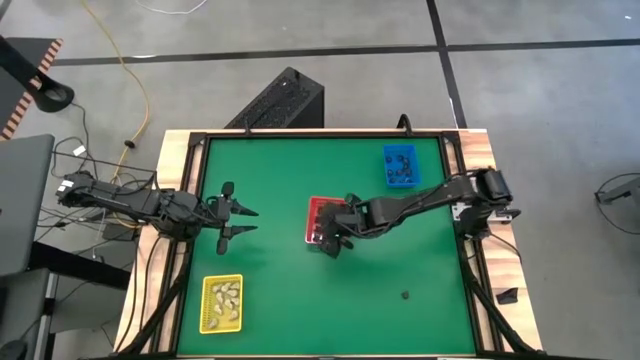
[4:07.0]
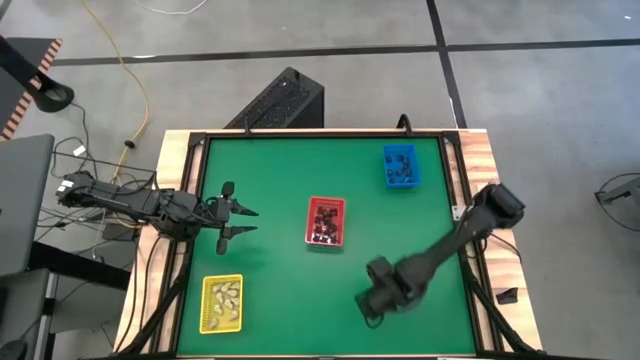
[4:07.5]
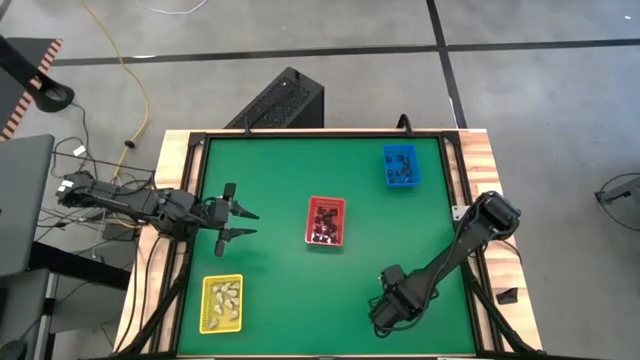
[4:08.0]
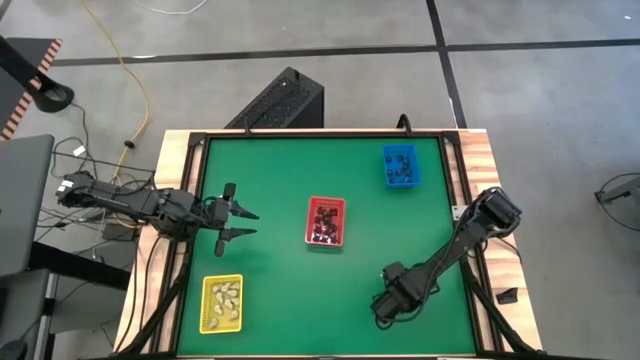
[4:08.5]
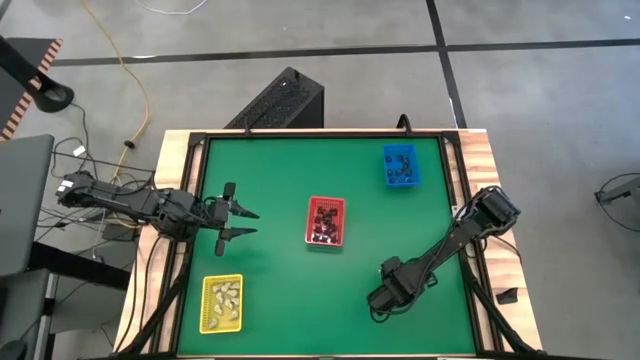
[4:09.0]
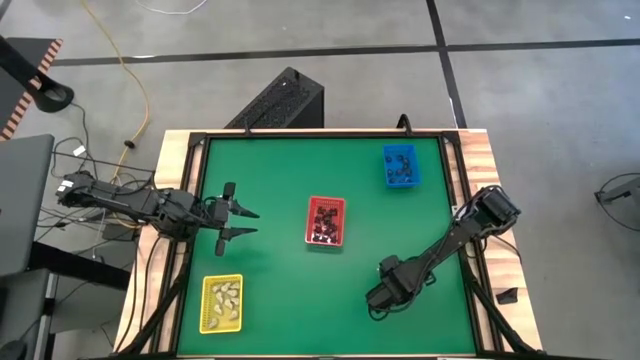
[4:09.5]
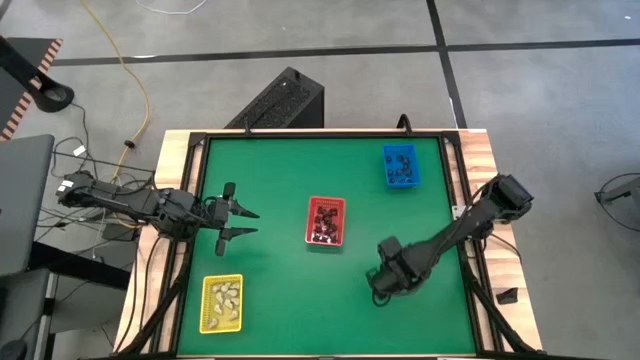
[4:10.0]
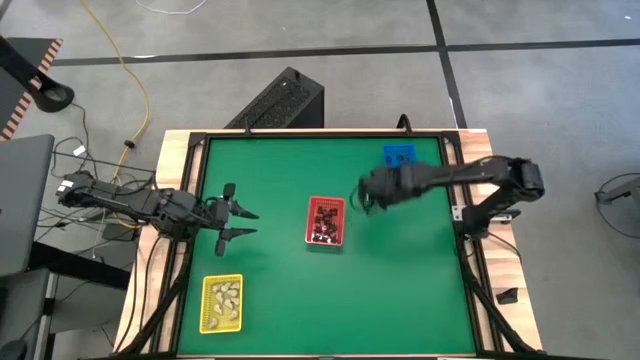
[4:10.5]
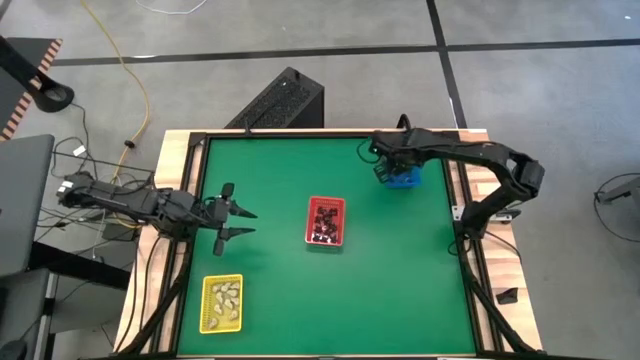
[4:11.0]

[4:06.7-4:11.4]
Task: Sort Halloween decoration
Put the black skull toy into the blue bin

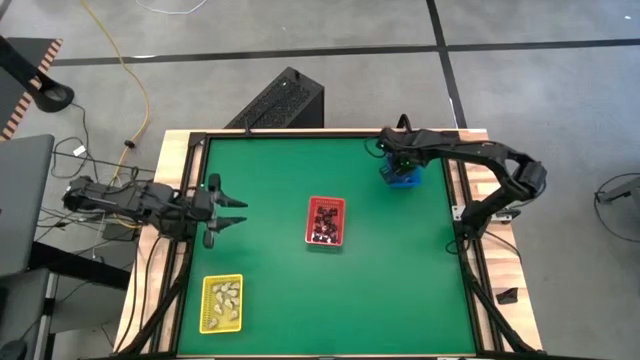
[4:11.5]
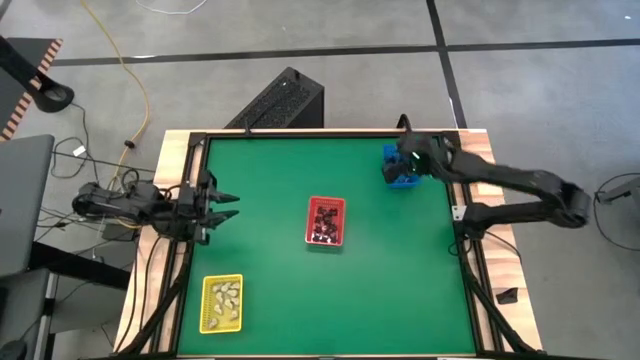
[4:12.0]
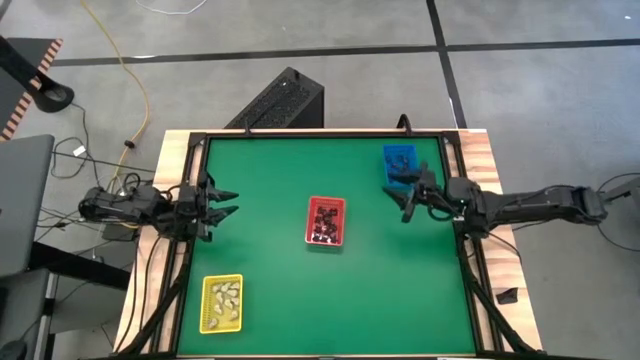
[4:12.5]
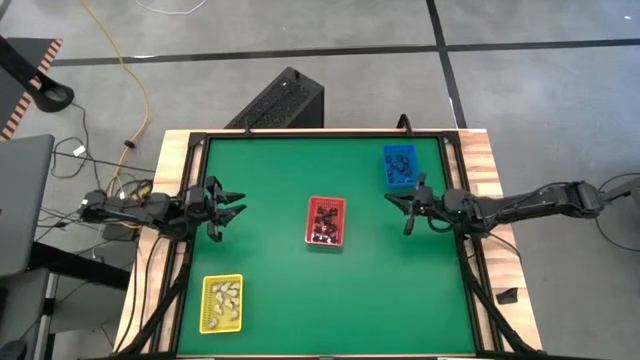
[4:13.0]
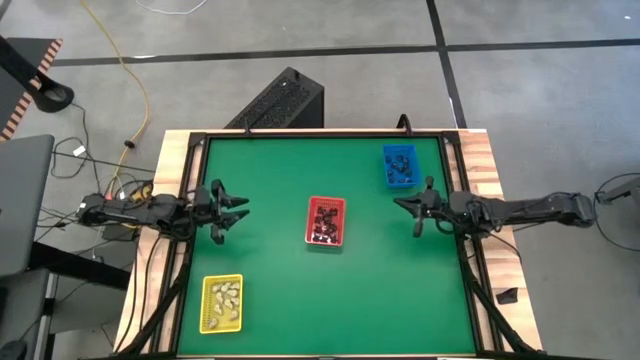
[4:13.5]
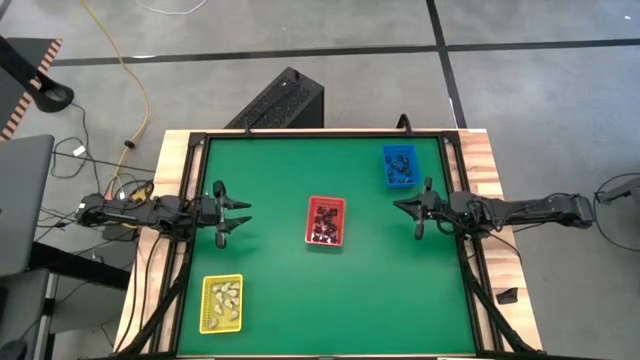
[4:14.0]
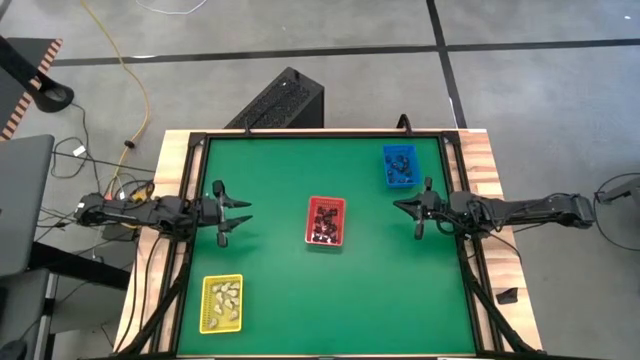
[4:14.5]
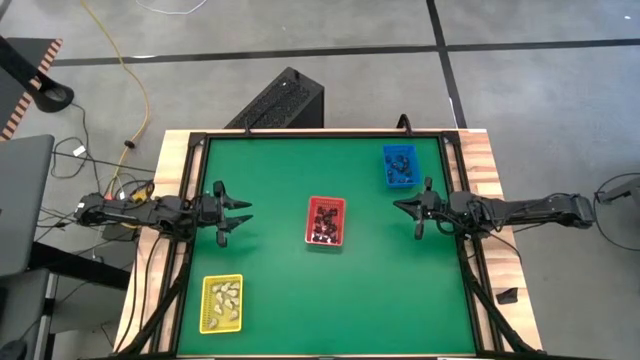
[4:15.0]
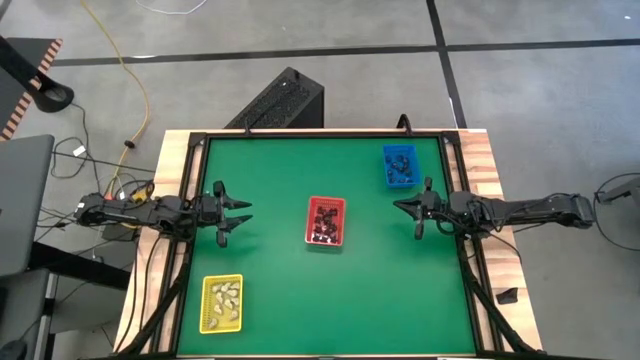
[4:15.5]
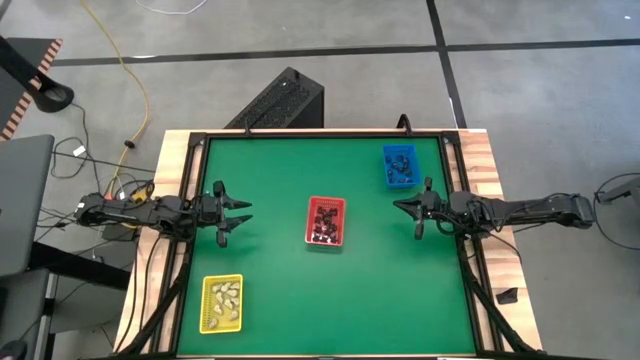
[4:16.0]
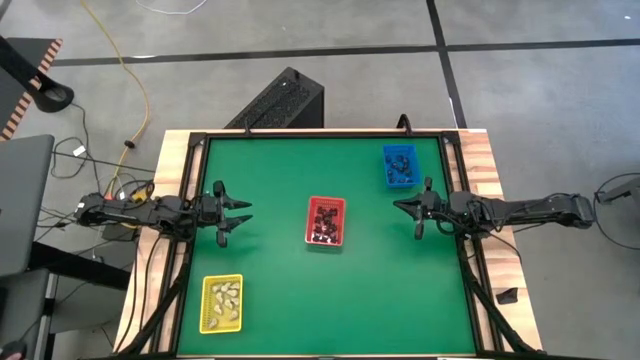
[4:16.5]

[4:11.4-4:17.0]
Return to Home Position

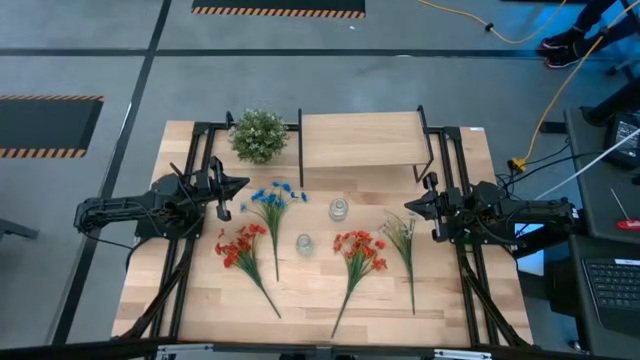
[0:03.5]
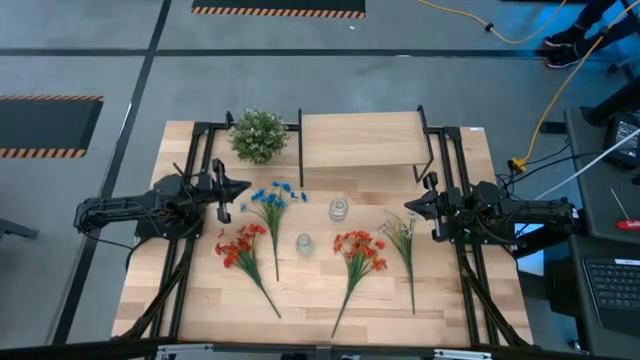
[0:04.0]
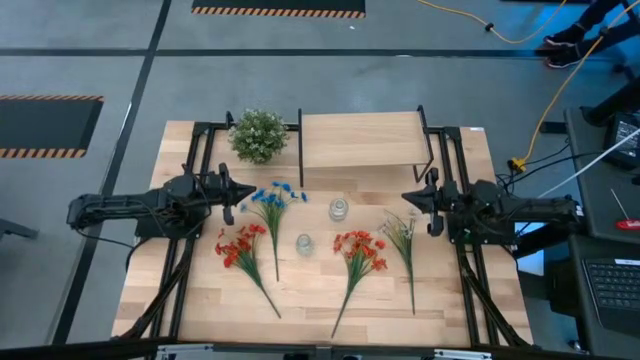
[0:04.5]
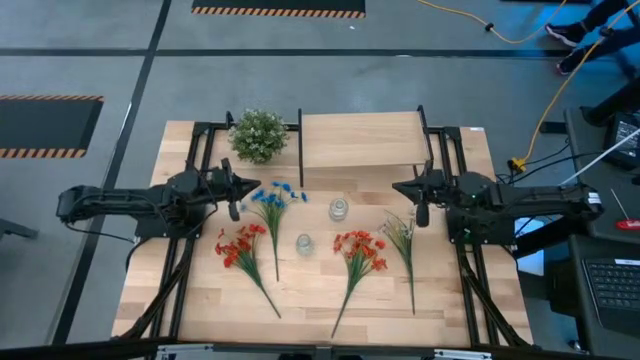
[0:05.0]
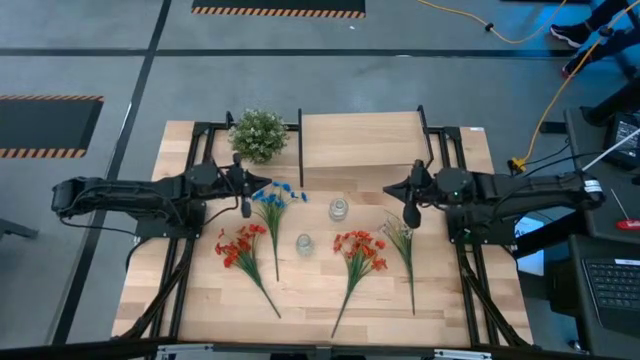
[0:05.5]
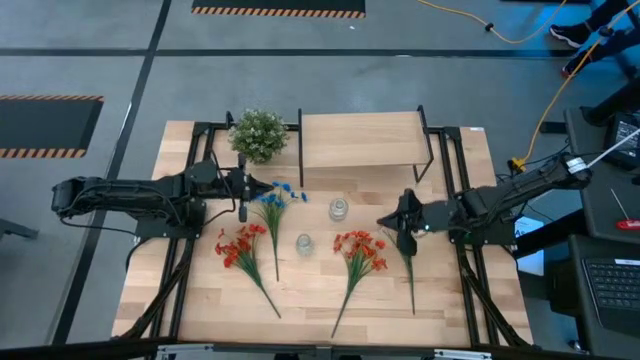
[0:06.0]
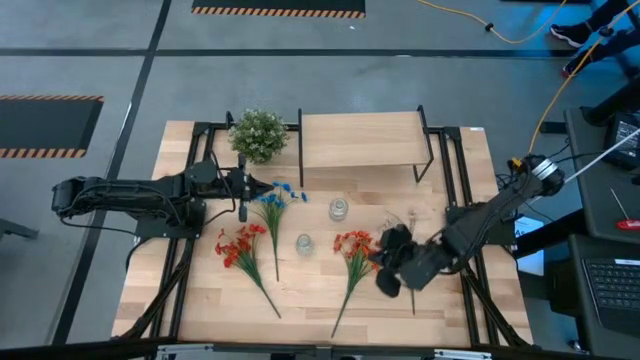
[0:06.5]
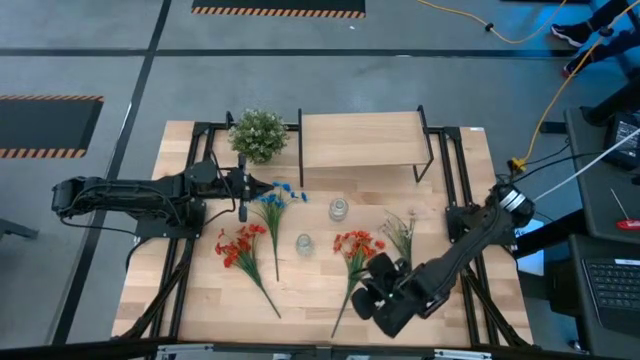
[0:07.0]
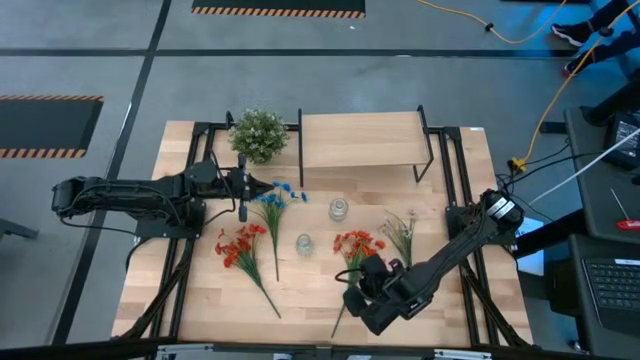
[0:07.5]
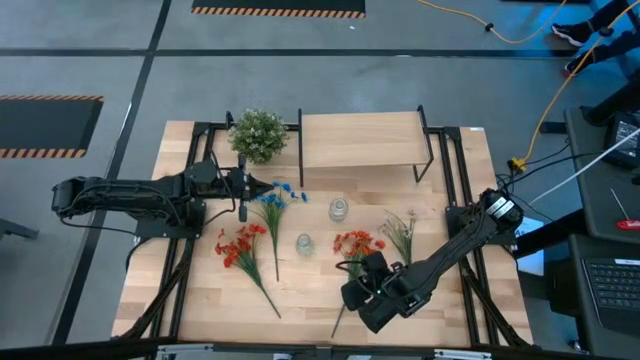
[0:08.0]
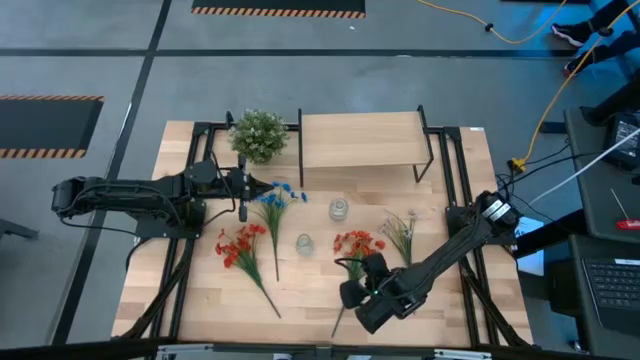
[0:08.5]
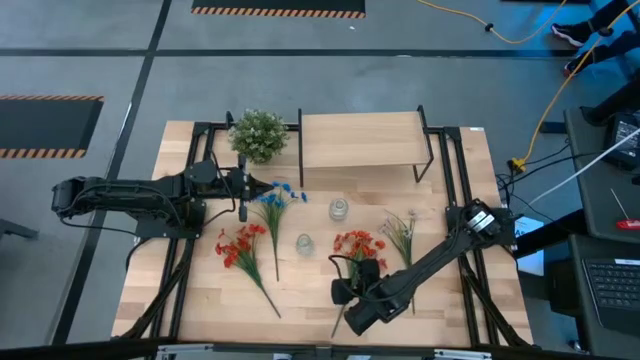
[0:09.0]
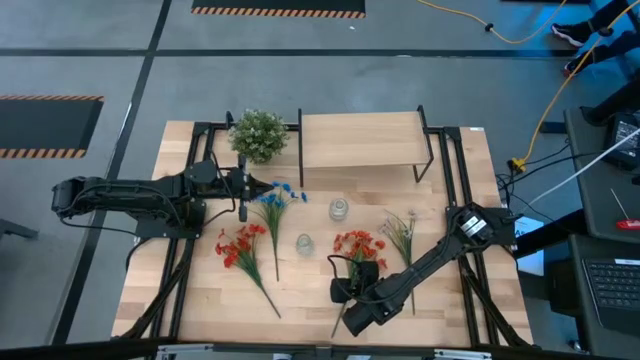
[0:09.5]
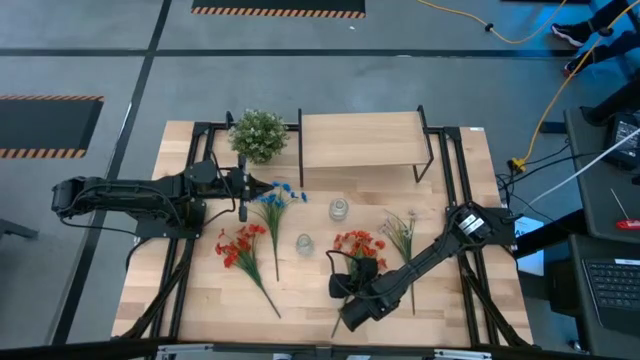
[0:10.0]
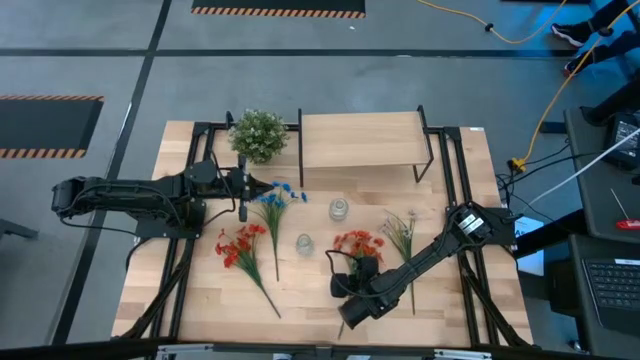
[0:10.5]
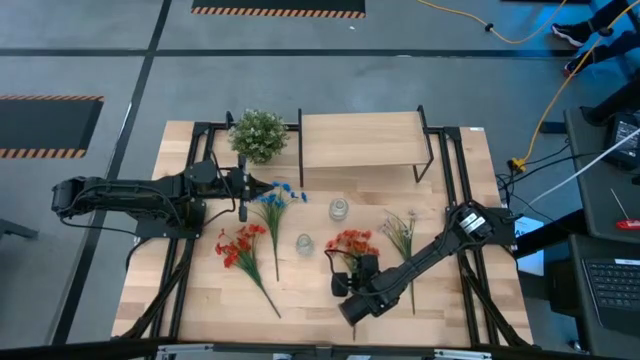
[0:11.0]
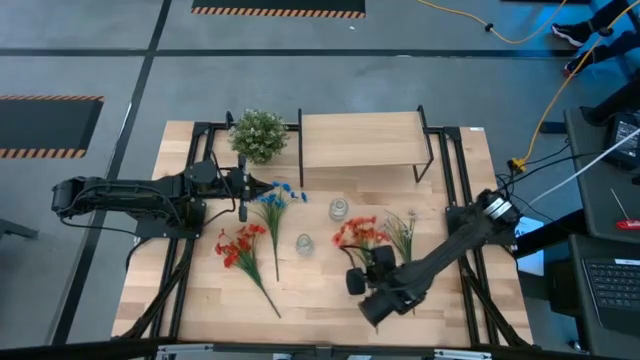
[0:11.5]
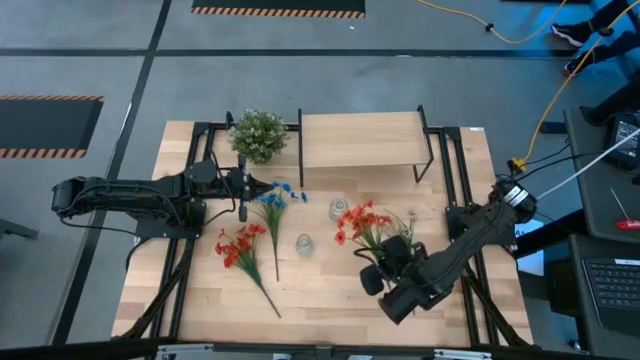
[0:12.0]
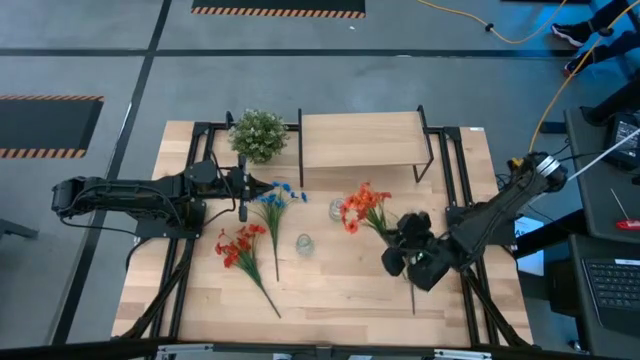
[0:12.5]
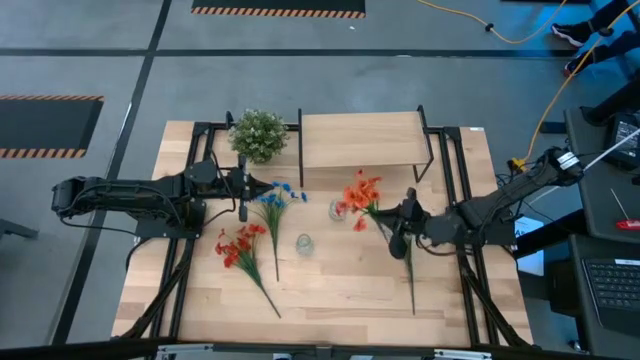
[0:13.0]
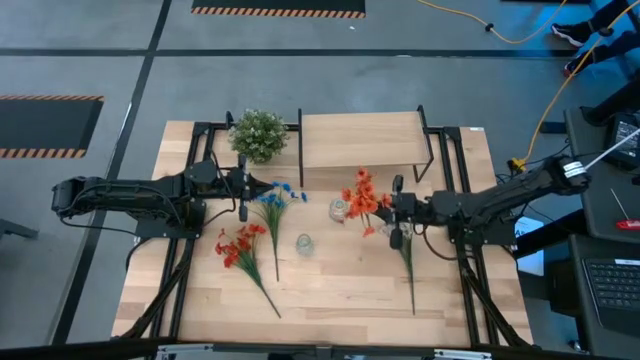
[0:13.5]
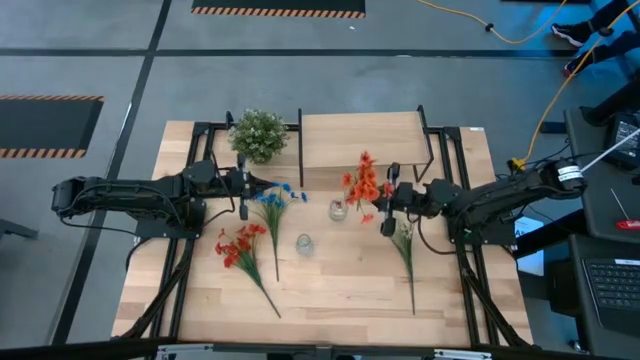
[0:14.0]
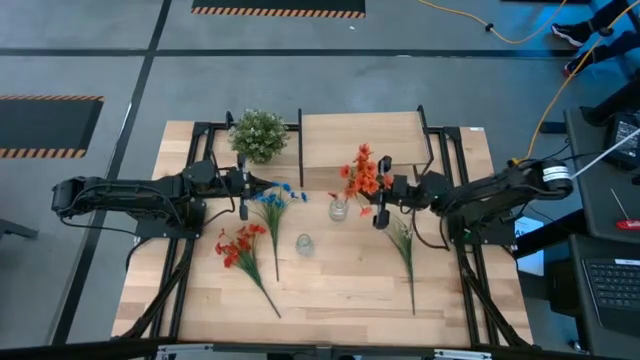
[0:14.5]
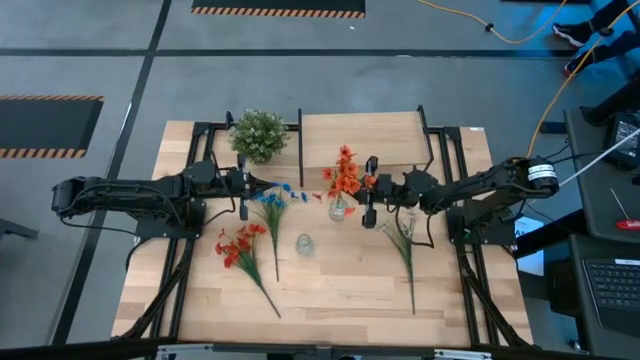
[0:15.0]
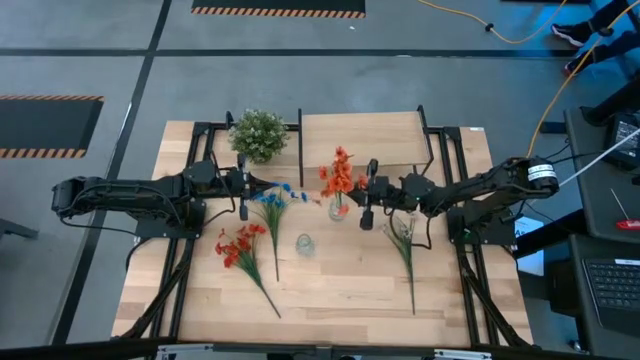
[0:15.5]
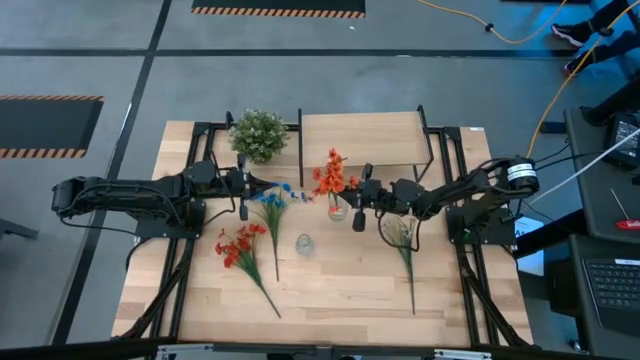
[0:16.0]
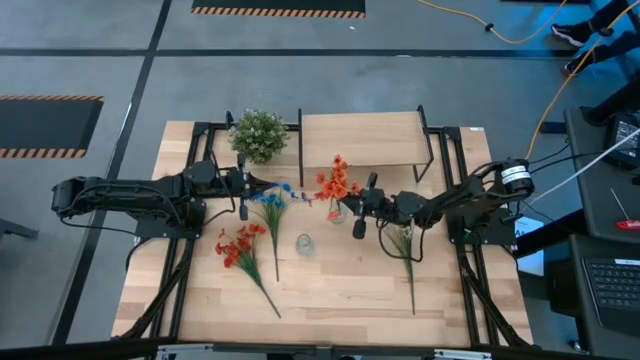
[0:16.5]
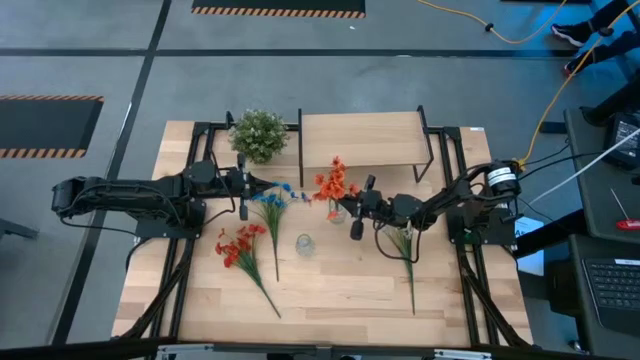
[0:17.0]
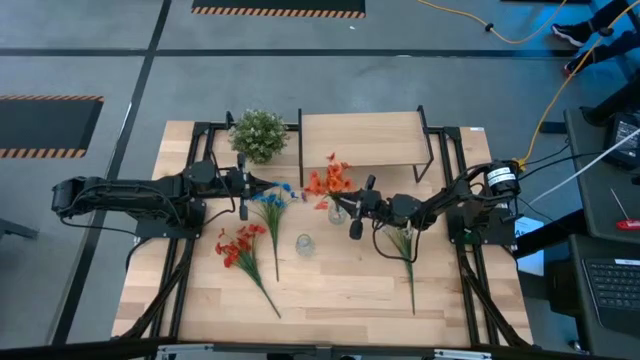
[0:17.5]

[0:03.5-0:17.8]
Task: Pick and place flowers into a vace then onto a shelf
Put the right orange flowers into the top transparent vase
